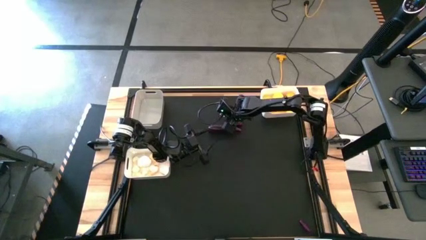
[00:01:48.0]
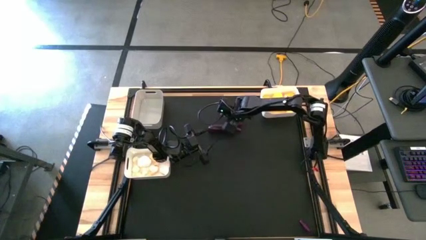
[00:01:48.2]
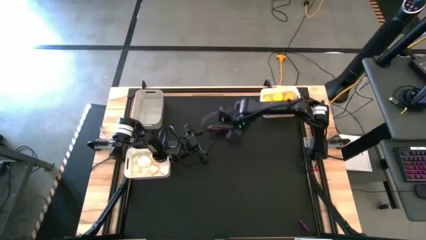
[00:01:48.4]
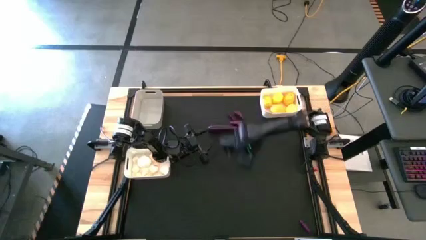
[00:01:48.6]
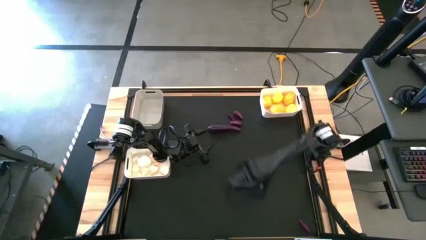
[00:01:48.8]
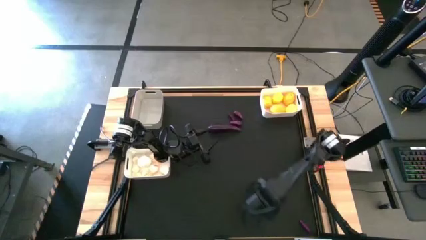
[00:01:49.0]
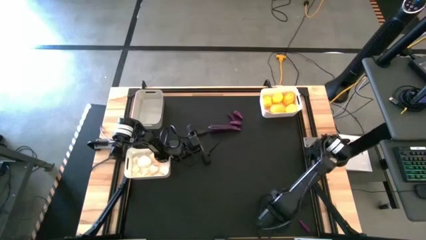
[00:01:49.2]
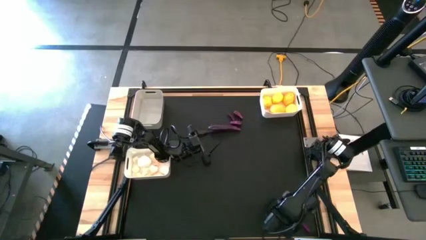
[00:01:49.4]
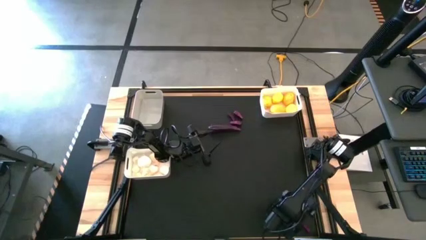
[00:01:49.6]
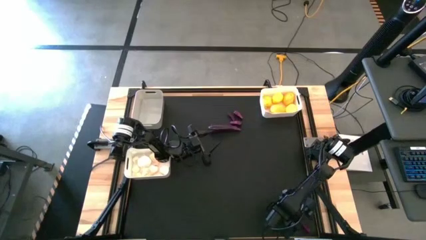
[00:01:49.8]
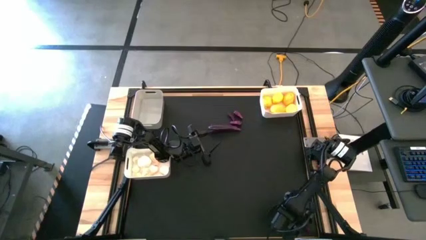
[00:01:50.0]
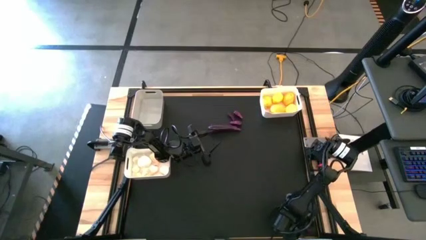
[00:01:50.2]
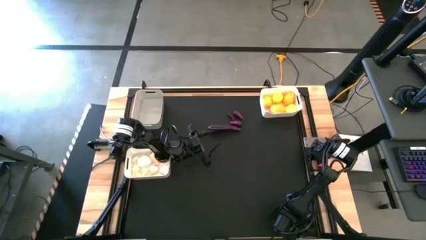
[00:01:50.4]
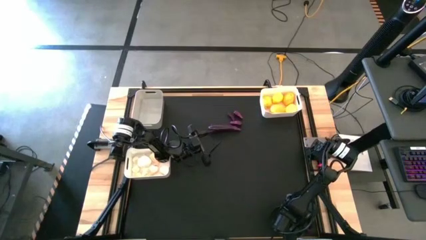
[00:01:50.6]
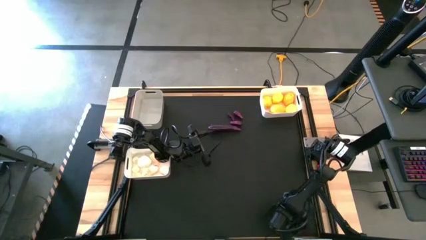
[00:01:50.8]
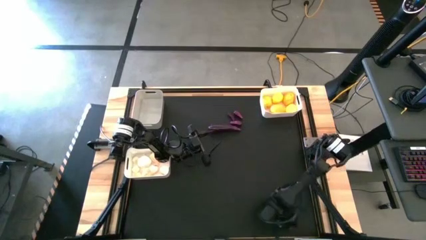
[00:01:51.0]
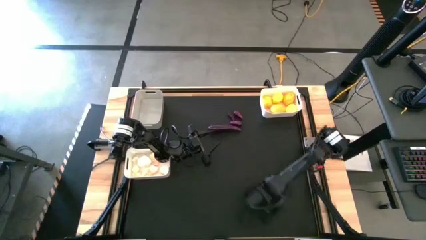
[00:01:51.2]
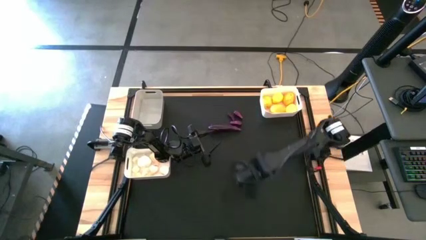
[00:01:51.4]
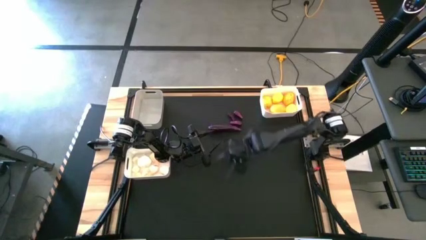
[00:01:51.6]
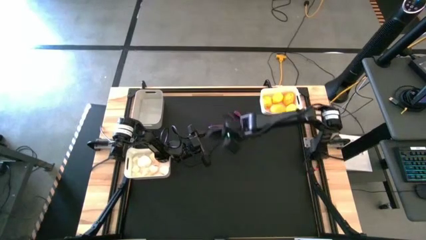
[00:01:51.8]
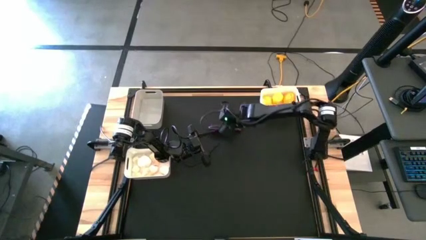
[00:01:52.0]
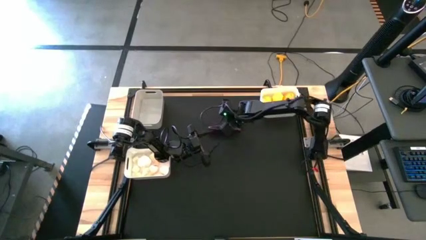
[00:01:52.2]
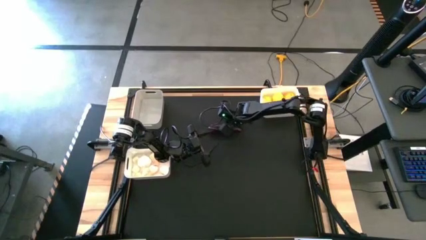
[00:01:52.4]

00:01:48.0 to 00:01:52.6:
Task: Sort produce into baskets
Move the violet eggplant to the top center of the table

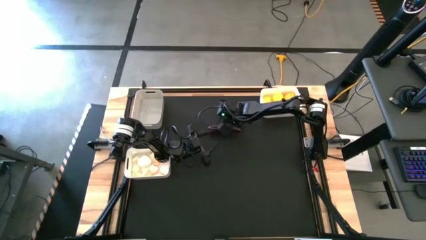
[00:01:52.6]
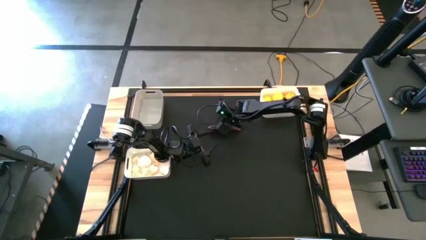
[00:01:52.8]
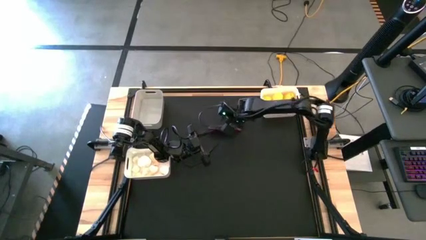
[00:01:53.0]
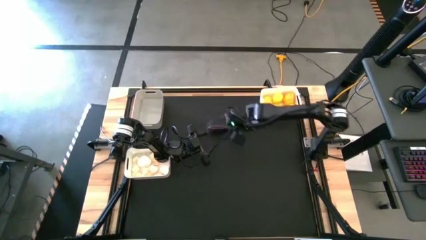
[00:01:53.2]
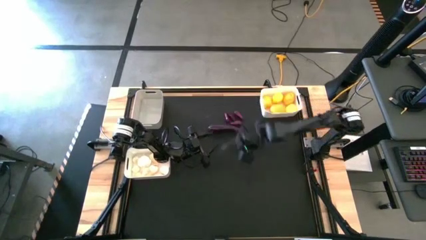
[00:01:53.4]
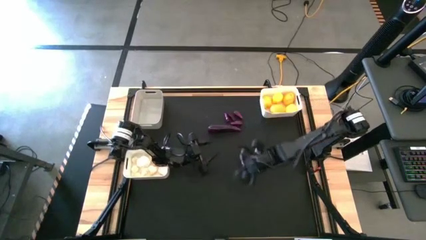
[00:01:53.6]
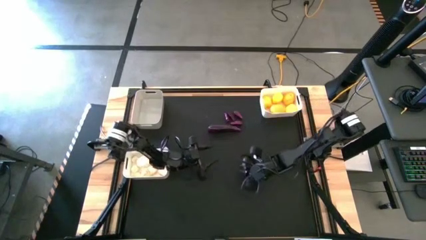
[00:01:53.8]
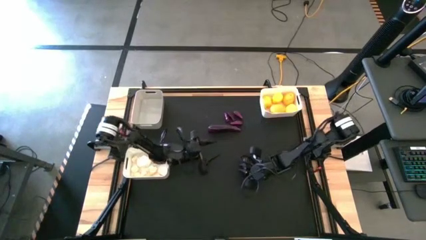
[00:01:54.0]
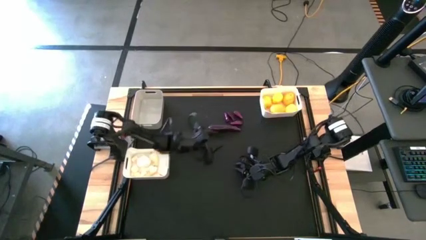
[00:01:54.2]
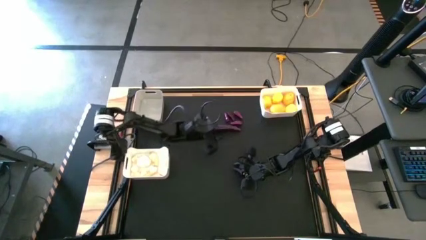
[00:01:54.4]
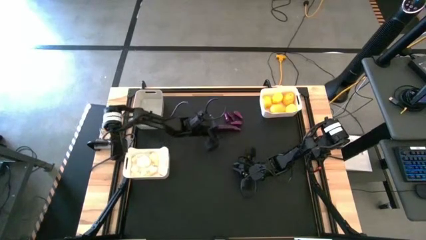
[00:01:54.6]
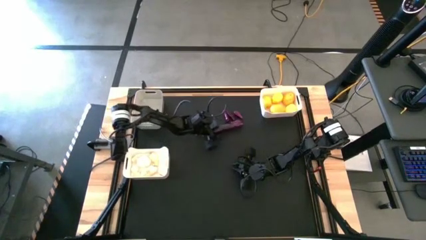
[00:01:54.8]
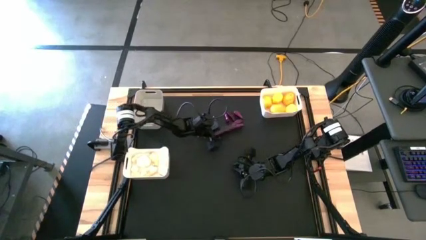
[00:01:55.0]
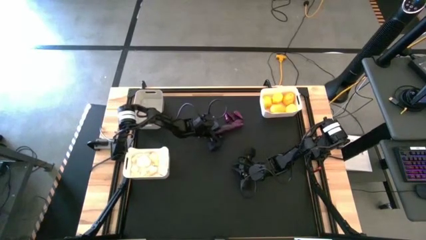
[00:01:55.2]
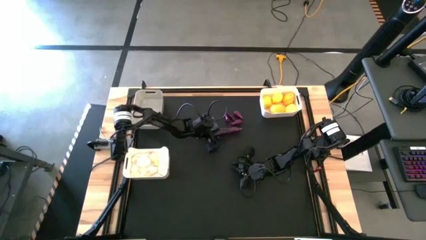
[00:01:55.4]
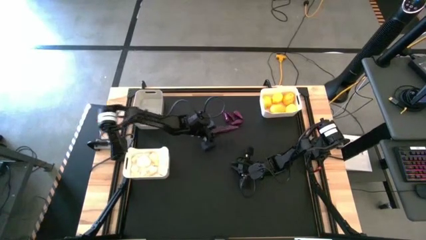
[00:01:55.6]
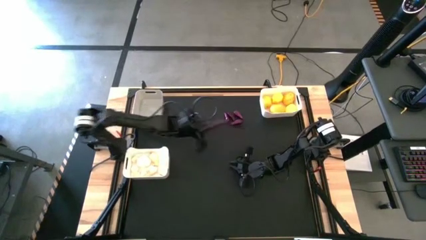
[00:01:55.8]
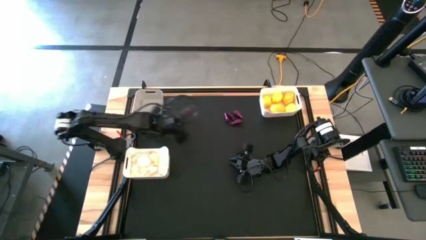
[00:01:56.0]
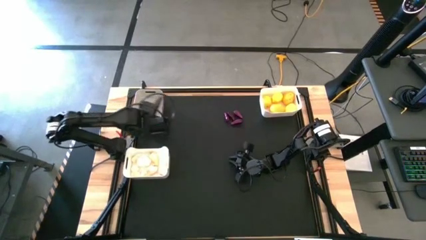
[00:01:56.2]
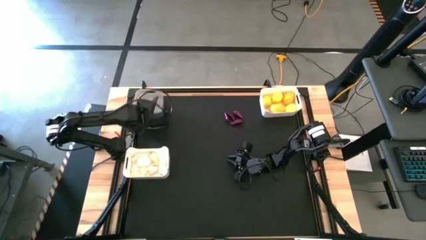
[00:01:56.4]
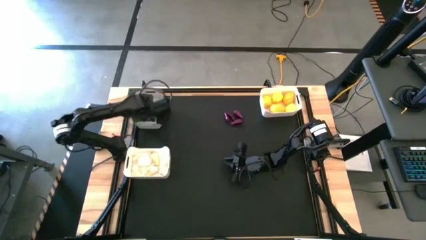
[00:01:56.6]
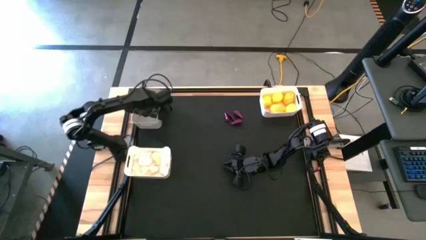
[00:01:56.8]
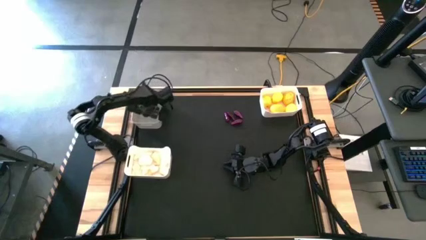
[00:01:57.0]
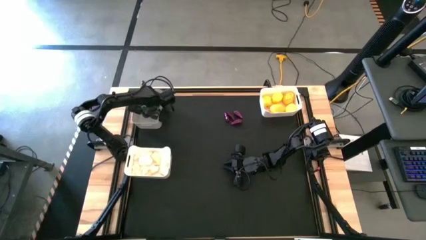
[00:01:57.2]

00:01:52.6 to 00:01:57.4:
Put the violet eggplant into the gray bin

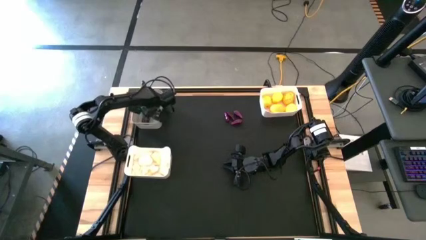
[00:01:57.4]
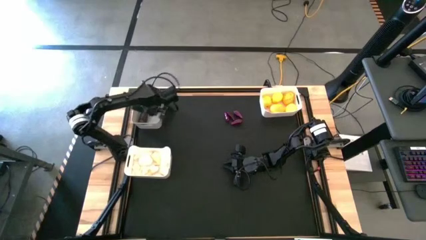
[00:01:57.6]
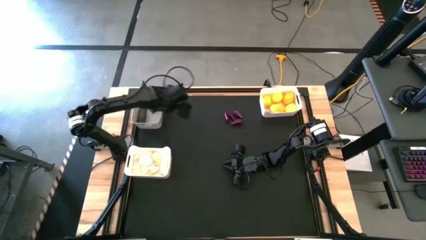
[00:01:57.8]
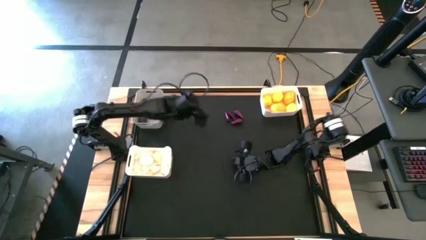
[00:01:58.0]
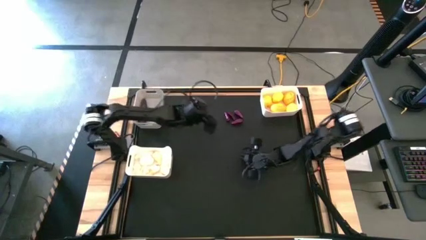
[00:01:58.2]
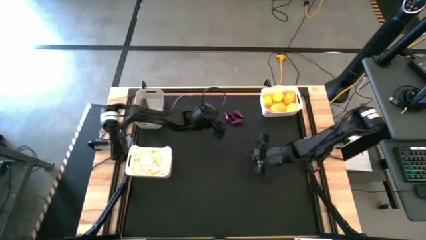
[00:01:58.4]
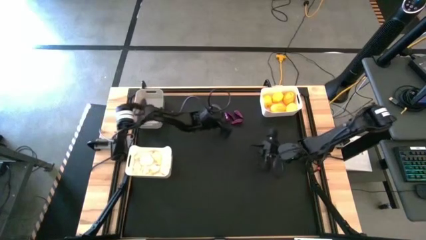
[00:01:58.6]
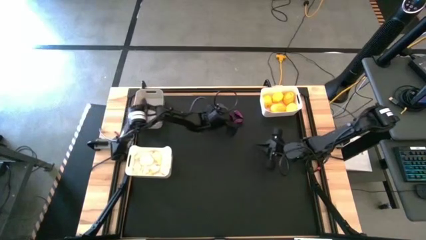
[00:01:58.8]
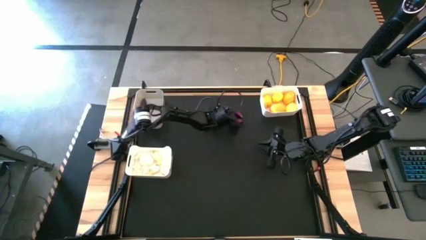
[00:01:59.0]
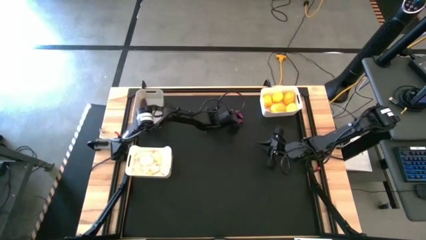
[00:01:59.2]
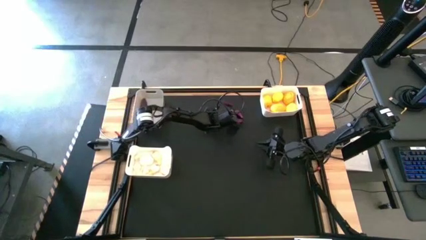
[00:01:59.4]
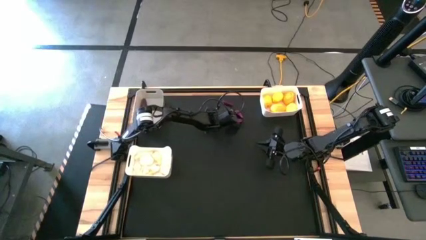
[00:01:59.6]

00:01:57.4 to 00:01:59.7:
Put the violet eggplant into the gray bin

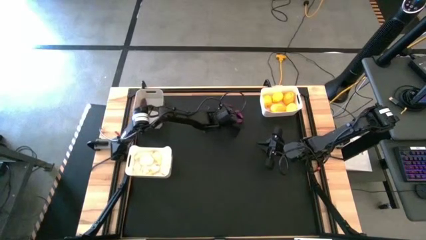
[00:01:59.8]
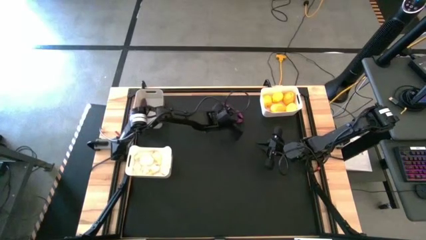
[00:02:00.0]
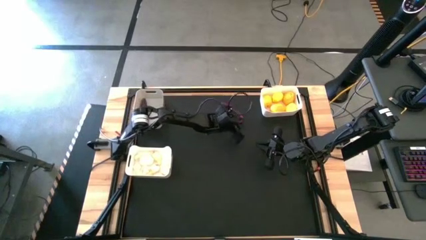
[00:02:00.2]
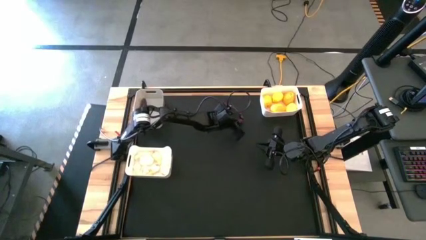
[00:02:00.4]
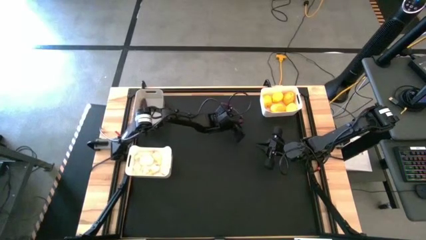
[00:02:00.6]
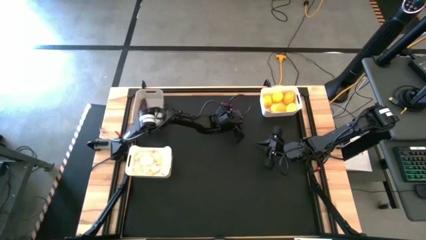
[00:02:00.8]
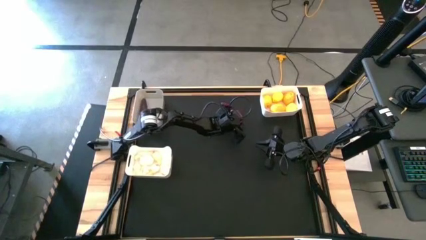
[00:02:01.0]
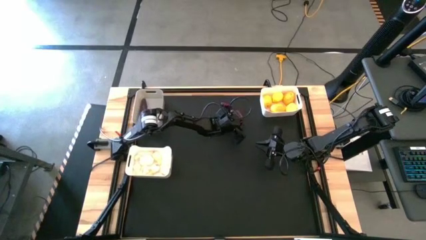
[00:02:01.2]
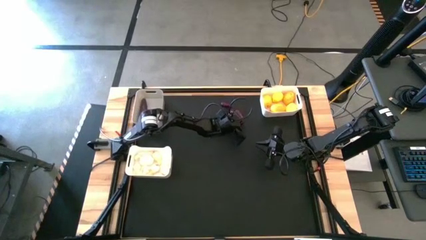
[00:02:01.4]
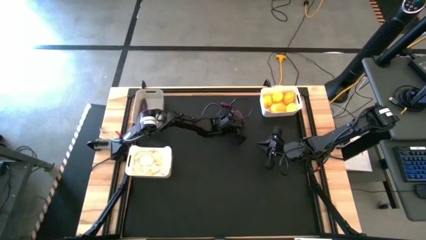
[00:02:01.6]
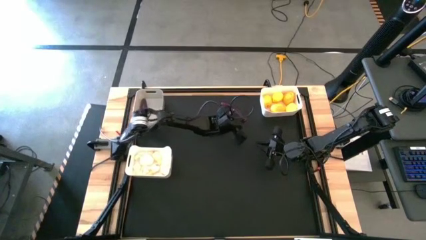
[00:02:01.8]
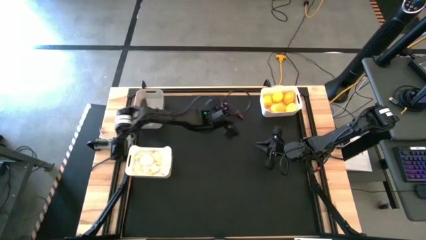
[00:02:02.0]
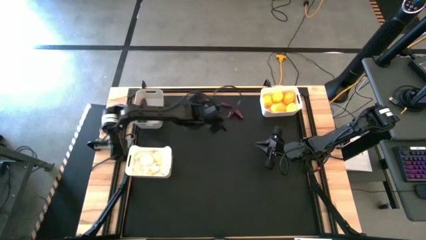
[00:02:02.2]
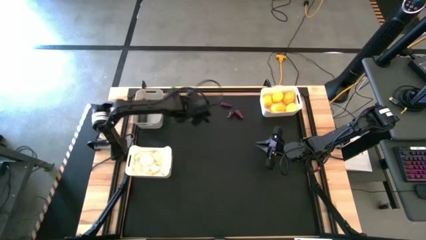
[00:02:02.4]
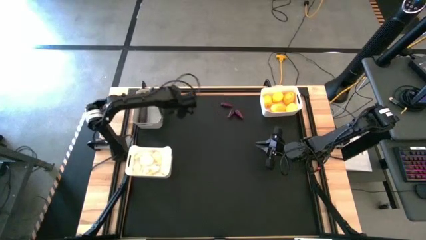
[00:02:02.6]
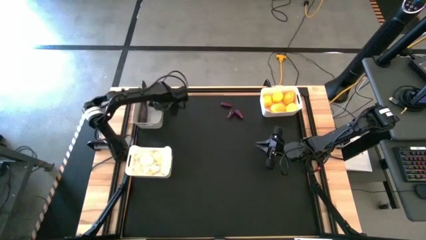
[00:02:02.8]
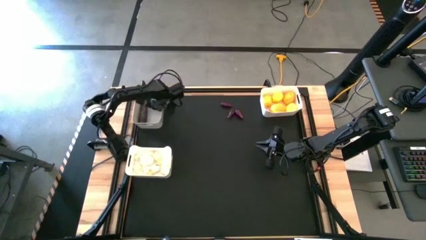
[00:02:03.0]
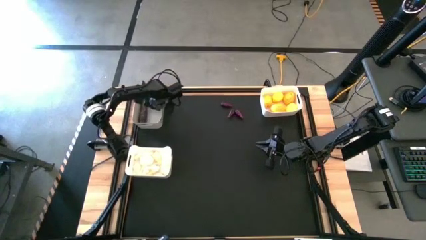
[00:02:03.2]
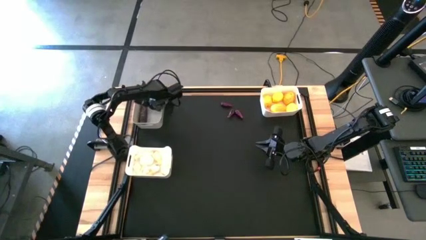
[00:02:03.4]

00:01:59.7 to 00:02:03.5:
Put the violet eggplant into the gray bin

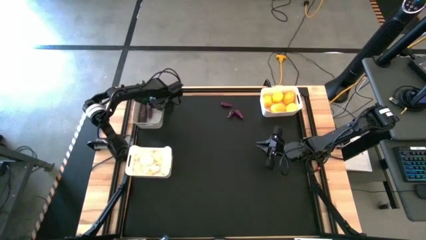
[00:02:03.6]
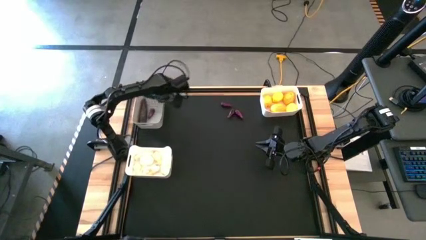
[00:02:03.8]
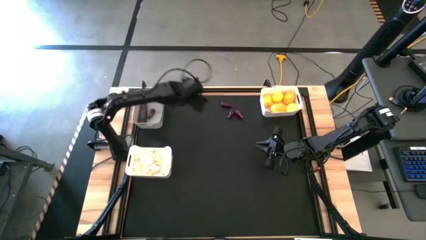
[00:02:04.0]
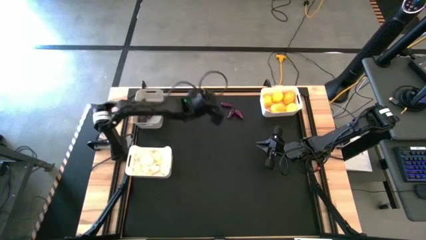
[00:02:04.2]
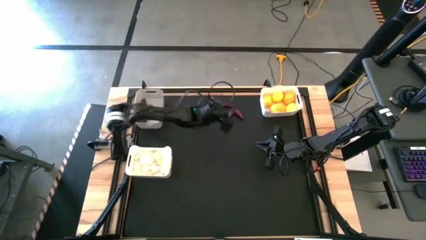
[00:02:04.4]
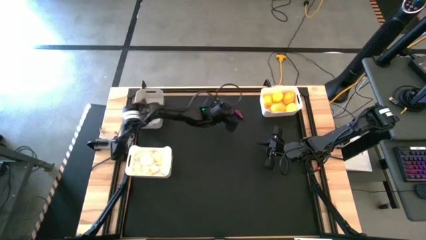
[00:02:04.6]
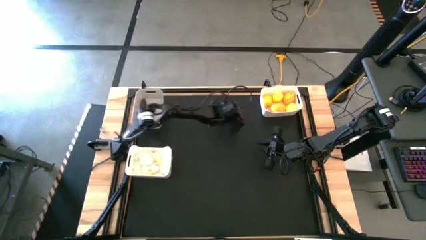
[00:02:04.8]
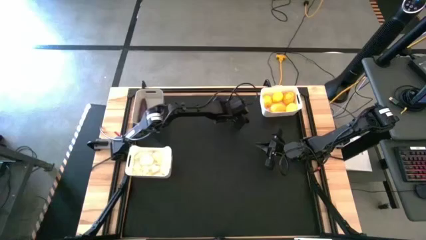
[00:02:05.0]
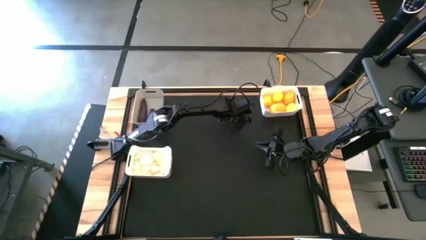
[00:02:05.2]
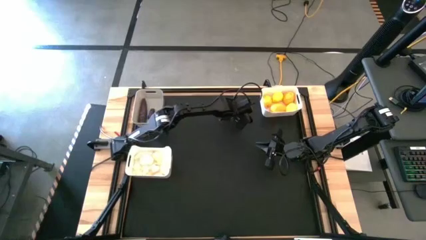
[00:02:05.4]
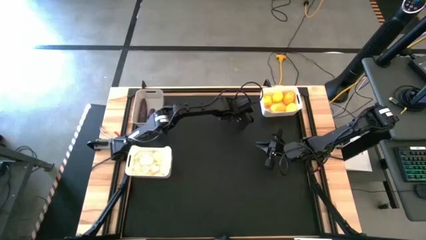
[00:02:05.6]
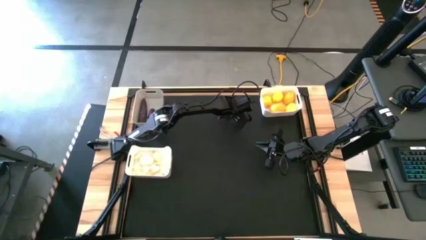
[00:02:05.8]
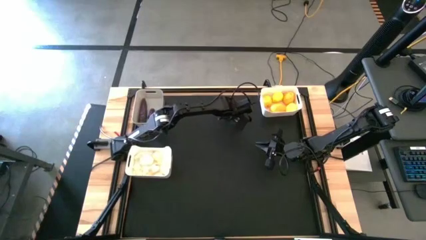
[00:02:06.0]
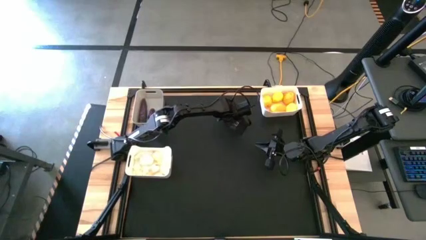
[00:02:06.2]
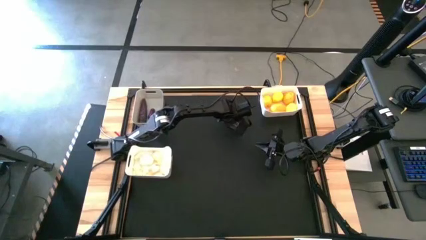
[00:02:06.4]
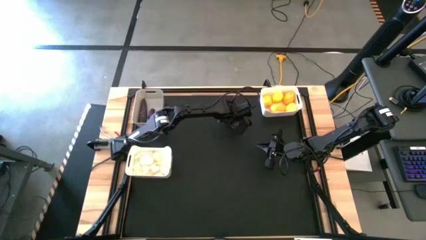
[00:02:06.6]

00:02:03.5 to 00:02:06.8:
Put the violet eggplant into the gray bin
